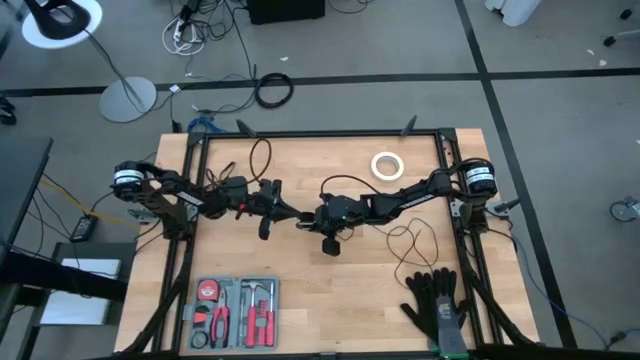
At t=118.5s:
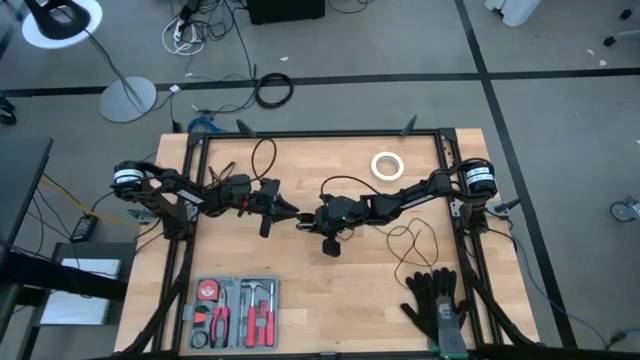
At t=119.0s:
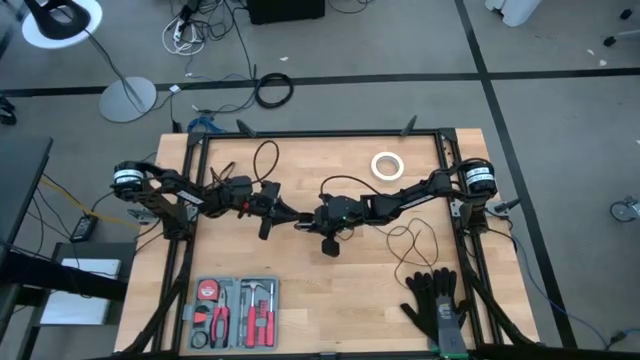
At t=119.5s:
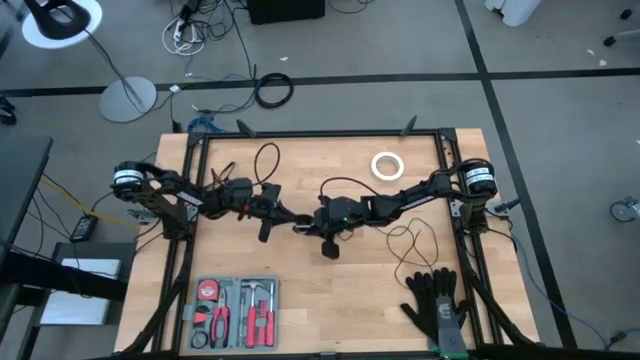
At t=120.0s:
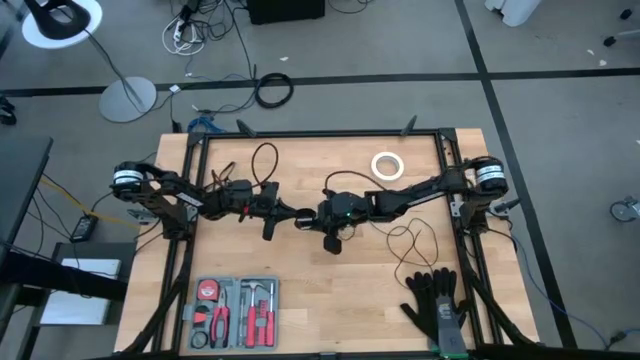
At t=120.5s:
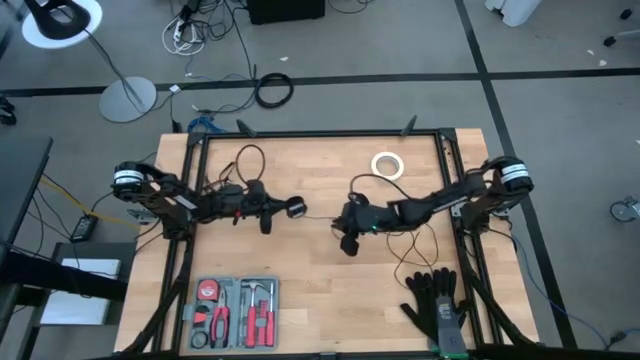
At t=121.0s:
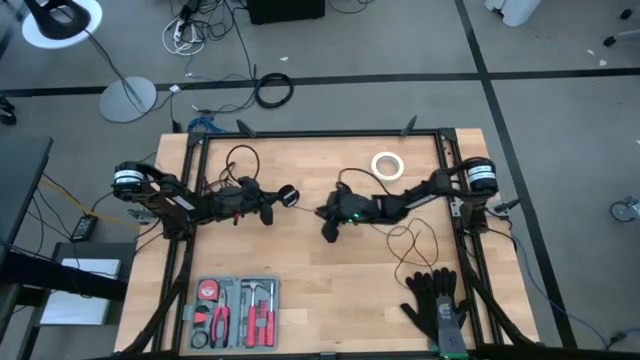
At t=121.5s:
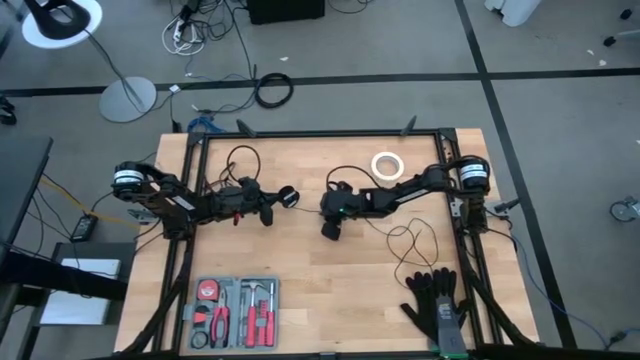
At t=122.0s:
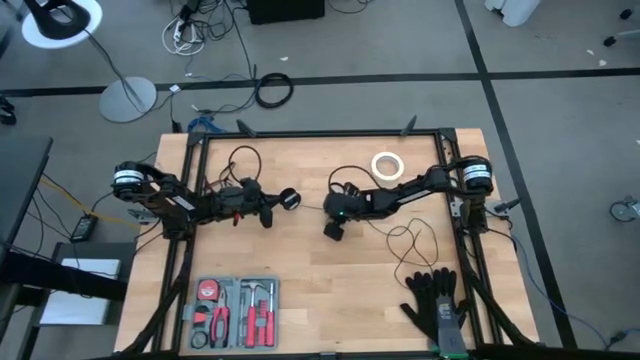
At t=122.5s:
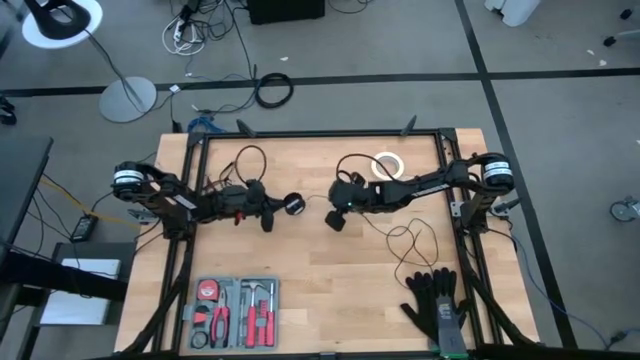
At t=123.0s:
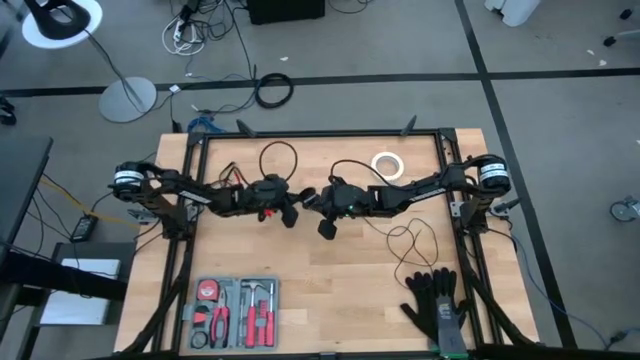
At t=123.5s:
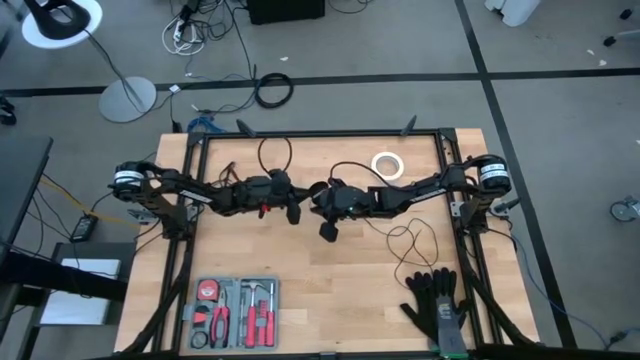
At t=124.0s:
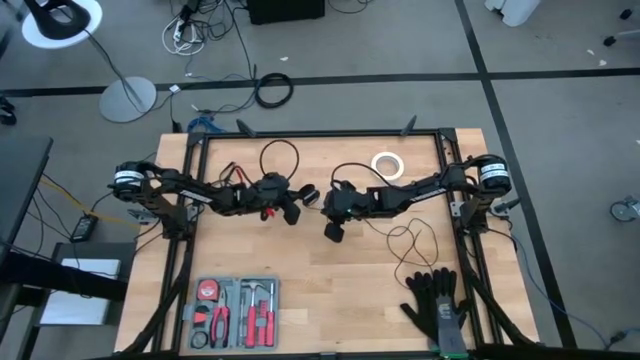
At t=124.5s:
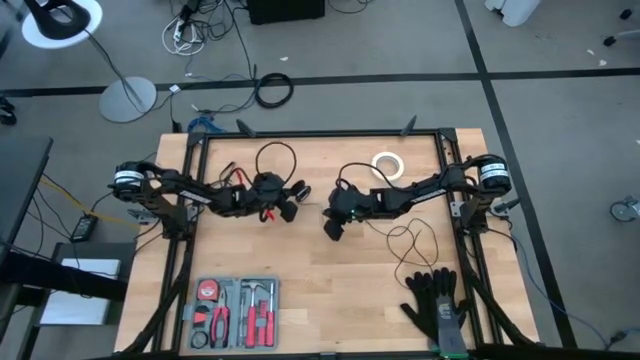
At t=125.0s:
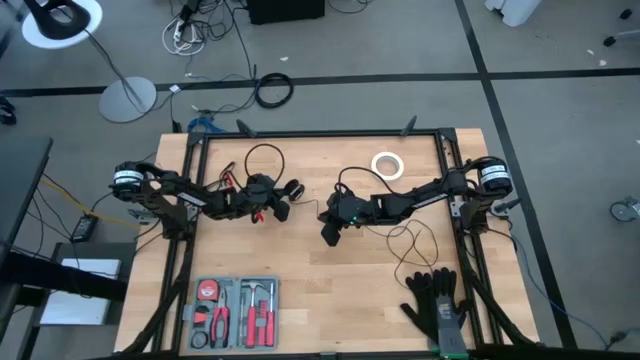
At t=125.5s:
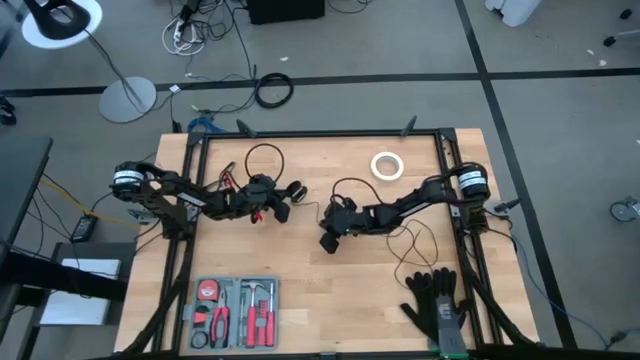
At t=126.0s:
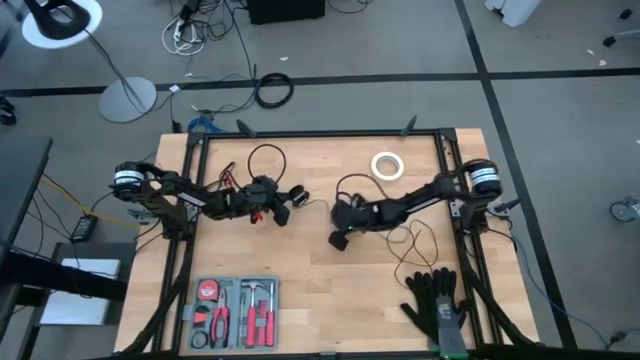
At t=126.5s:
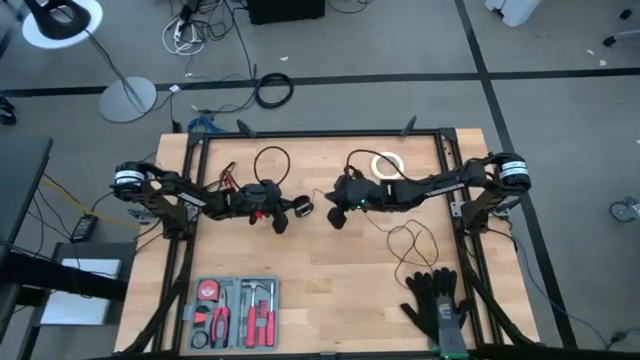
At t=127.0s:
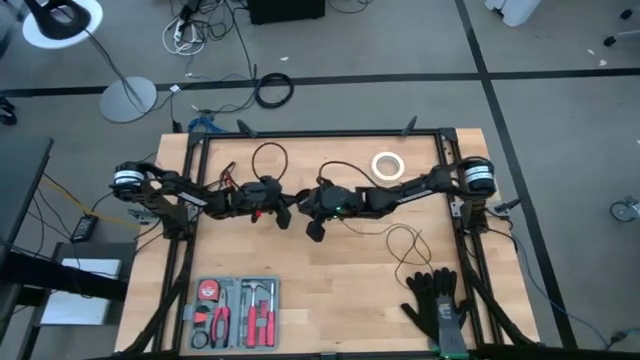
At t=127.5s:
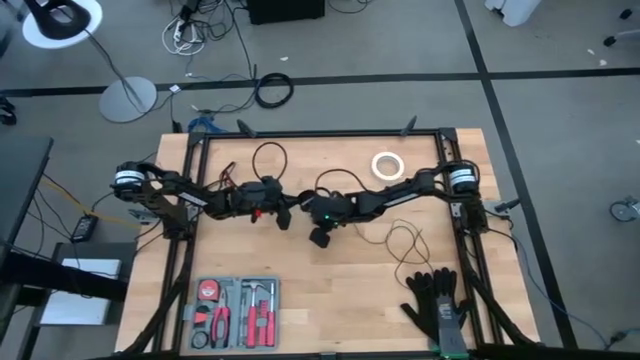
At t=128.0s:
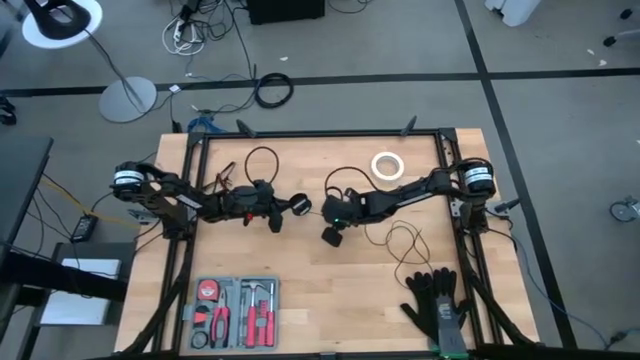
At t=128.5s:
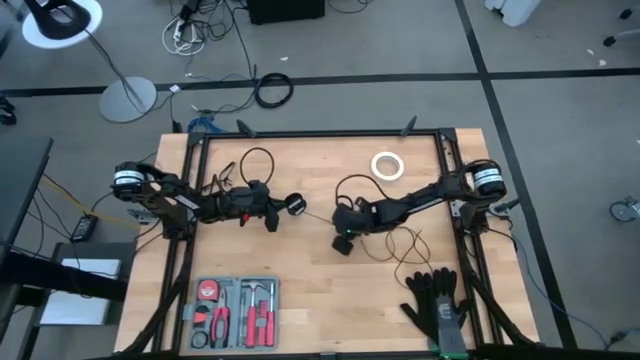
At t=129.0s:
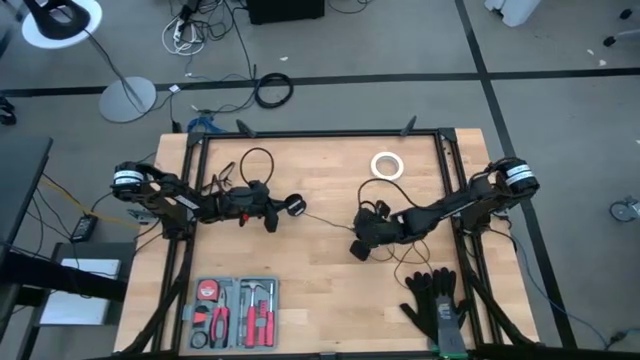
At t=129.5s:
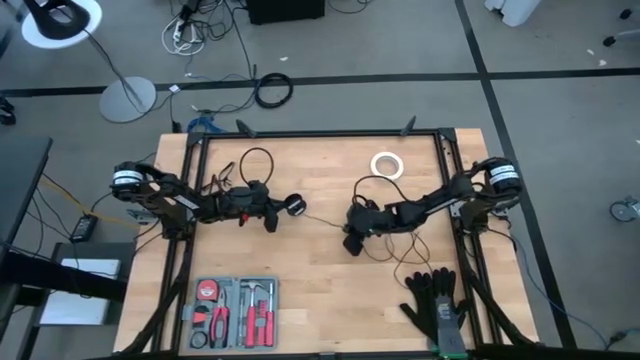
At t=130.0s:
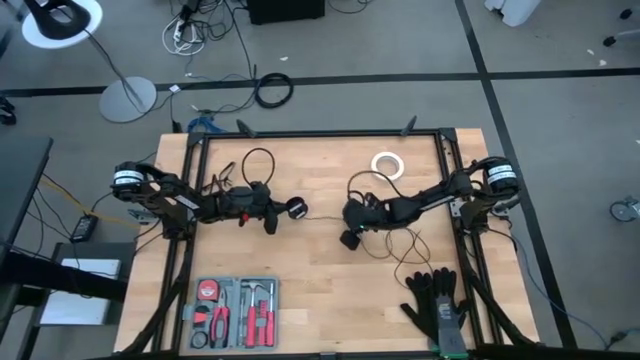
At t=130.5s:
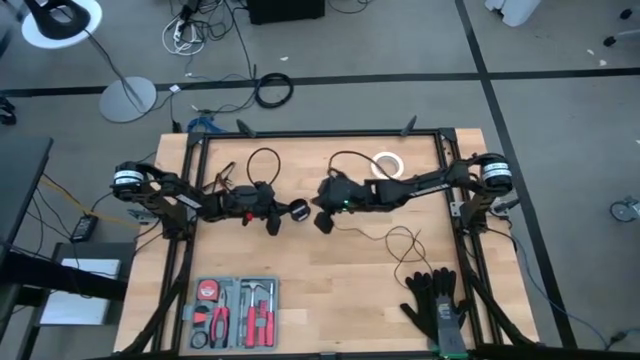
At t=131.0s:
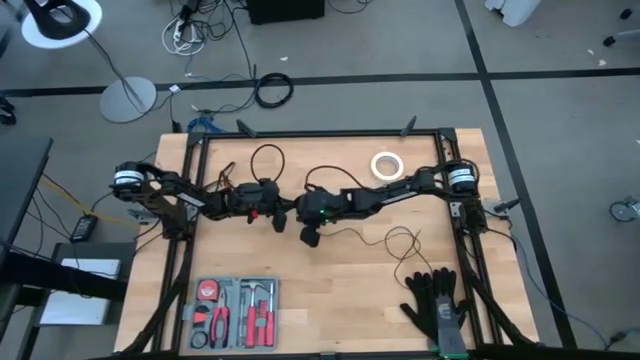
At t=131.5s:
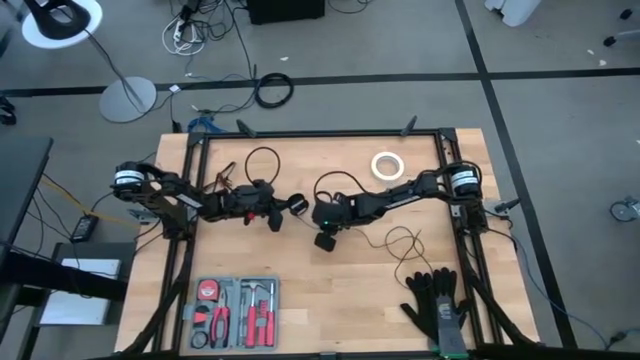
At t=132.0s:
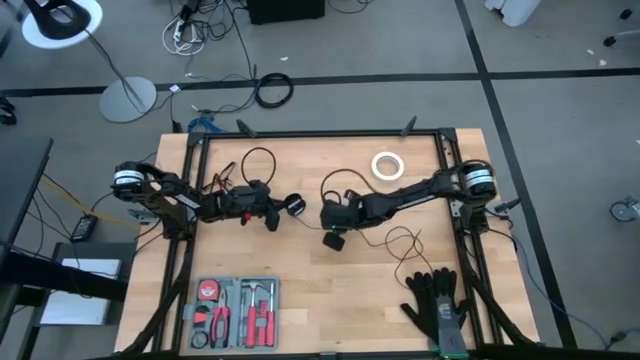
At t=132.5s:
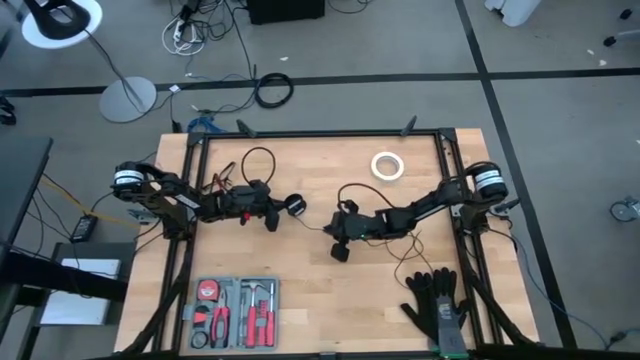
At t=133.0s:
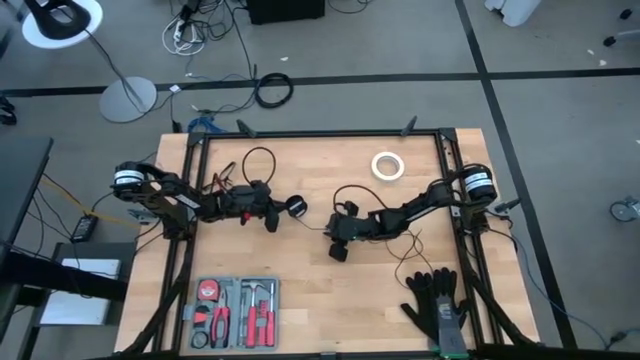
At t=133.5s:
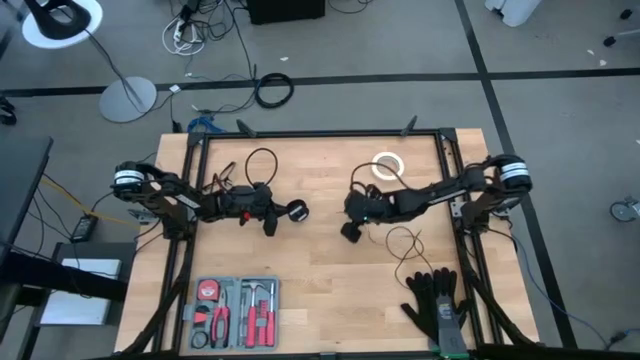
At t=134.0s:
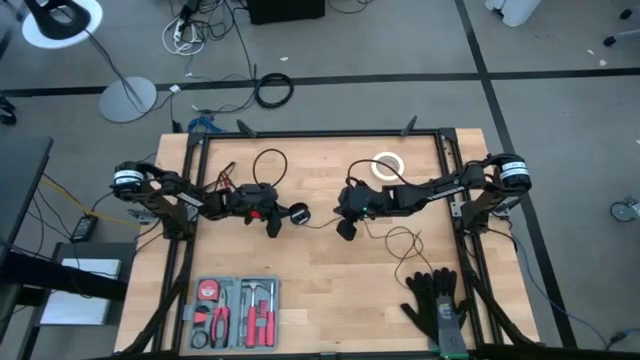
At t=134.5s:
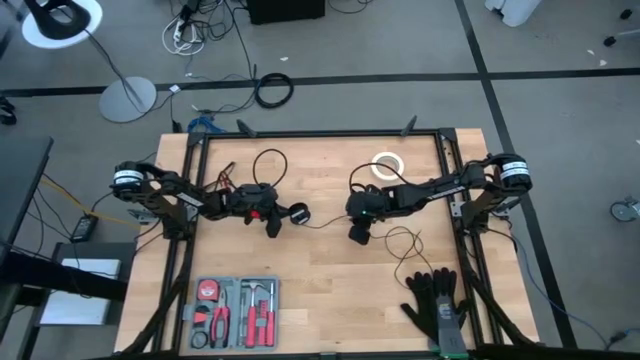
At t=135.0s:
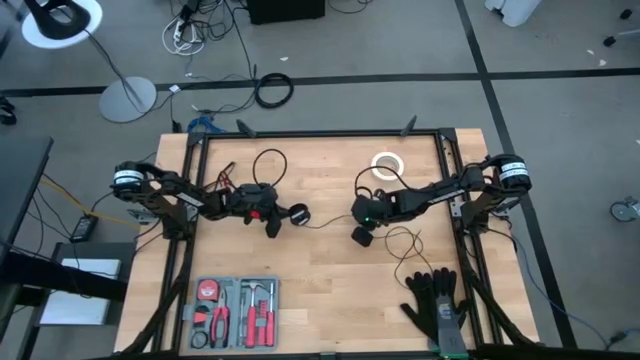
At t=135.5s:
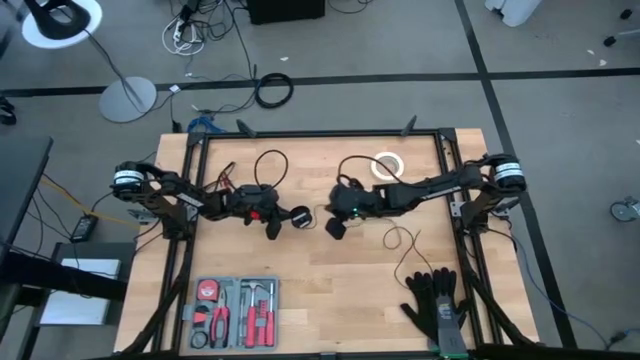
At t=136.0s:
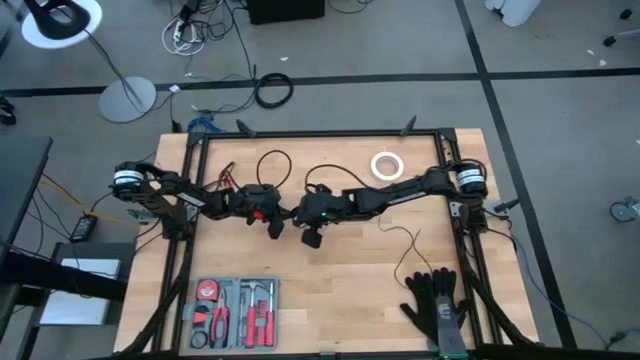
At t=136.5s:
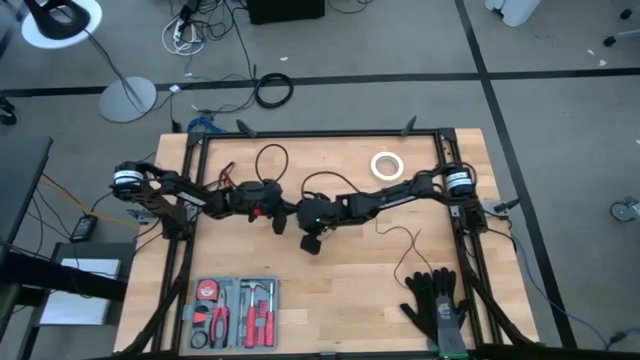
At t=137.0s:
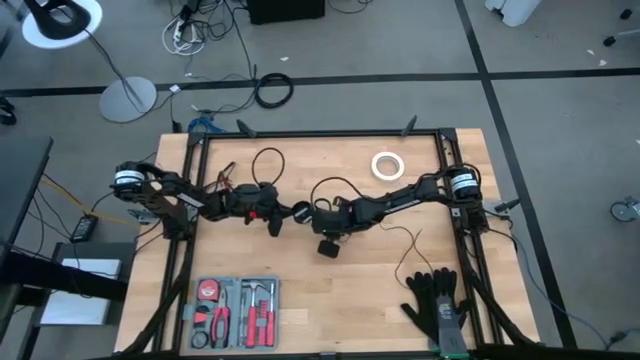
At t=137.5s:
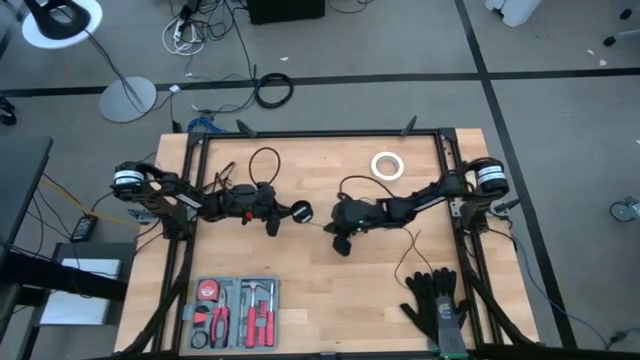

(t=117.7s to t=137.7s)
Task: Coil cords
Coil the black wire on the black spool

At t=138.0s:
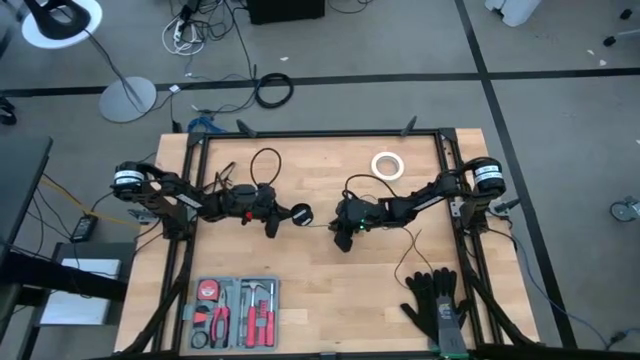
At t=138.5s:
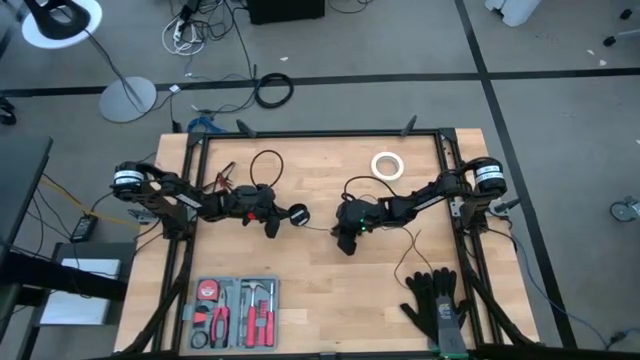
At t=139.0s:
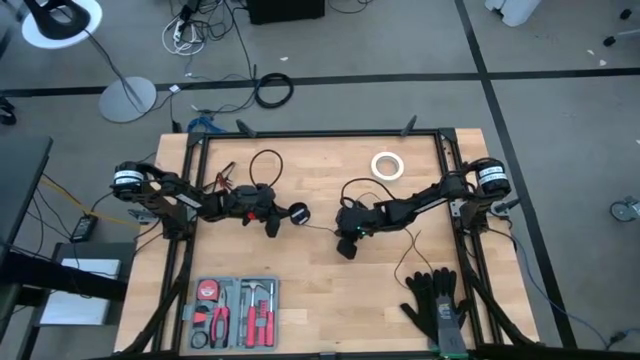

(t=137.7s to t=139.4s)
Coil the black wire on the black spool
